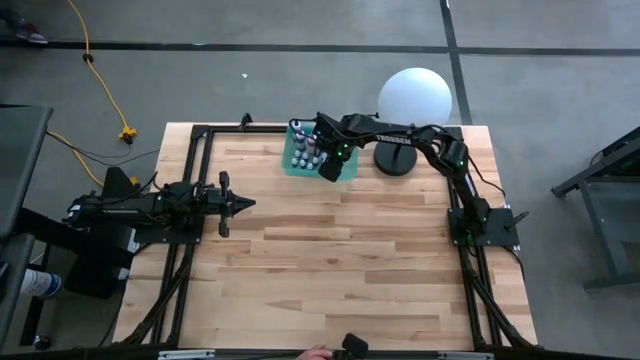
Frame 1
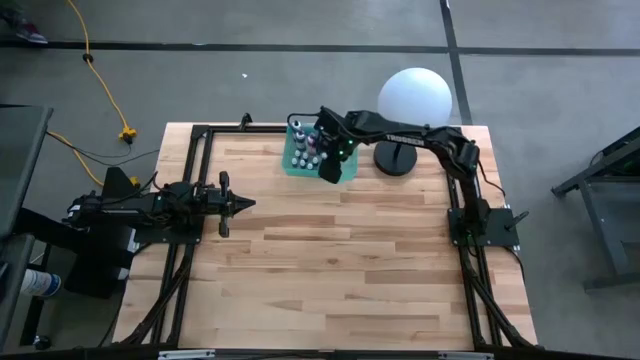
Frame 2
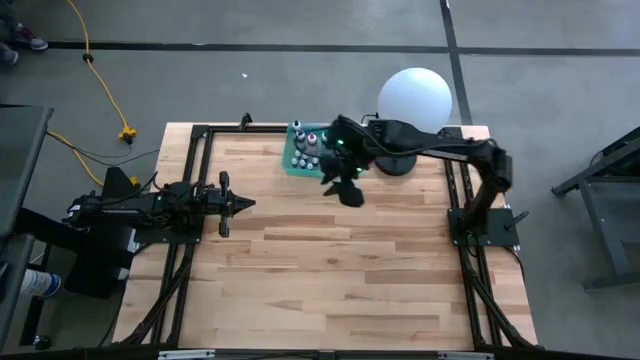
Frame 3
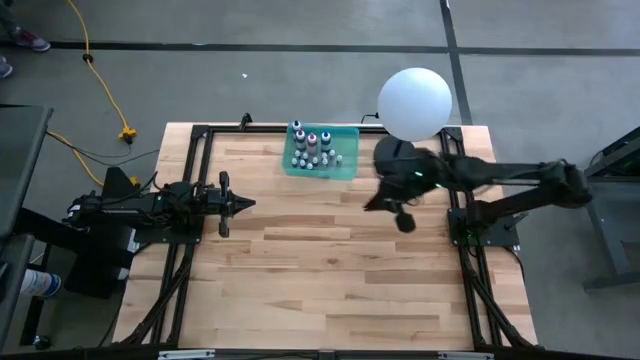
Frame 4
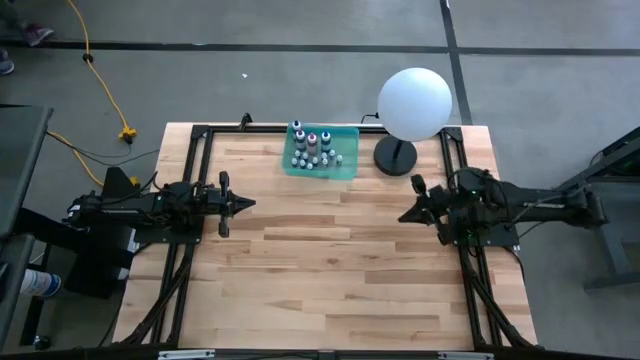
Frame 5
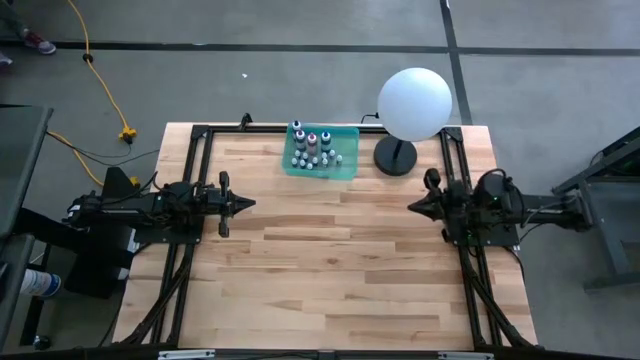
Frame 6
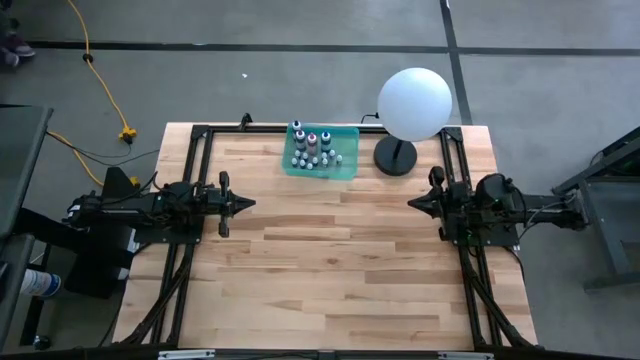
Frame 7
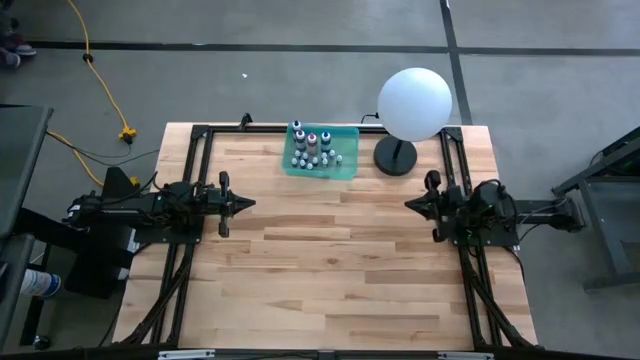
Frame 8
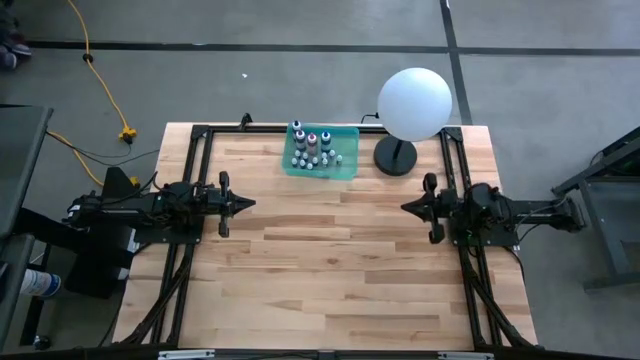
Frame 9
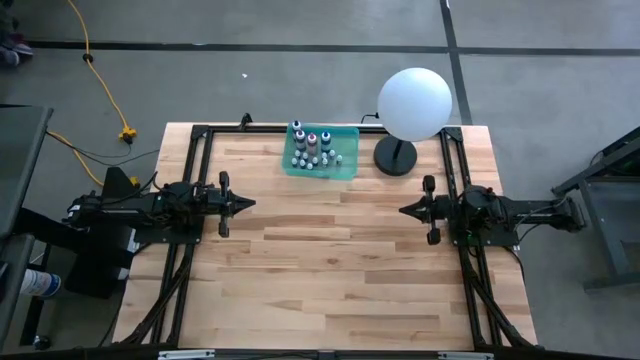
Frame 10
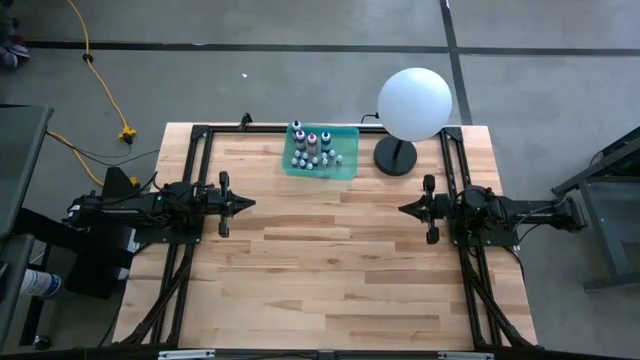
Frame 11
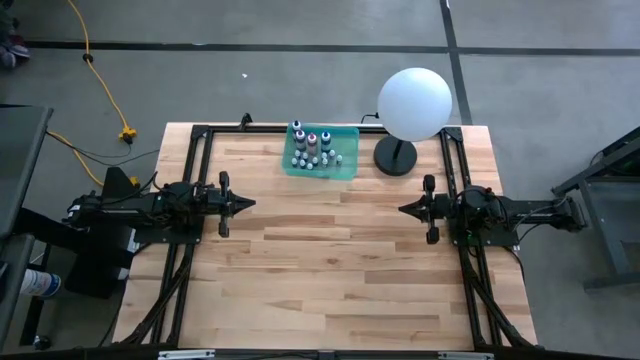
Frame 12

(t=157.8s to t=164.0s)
Task: Pick & Place food coloring
Return to Home Position

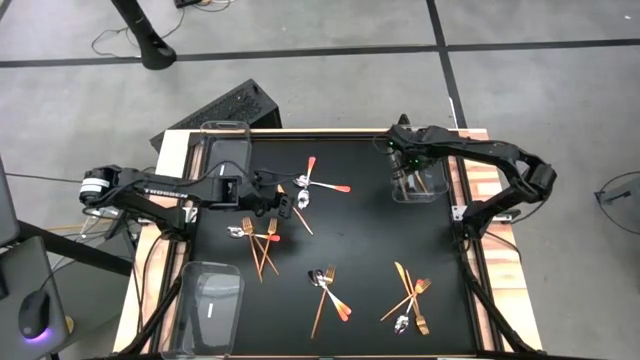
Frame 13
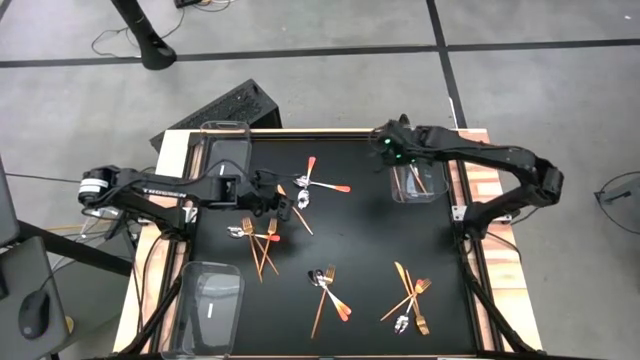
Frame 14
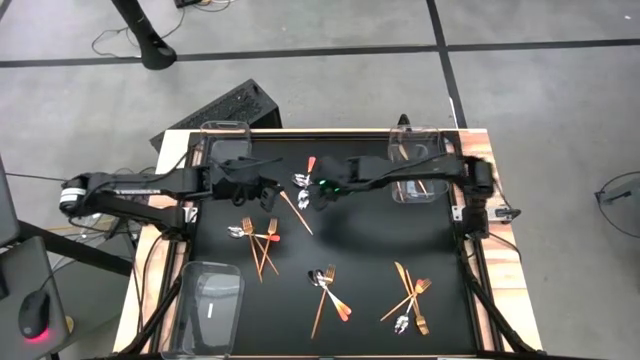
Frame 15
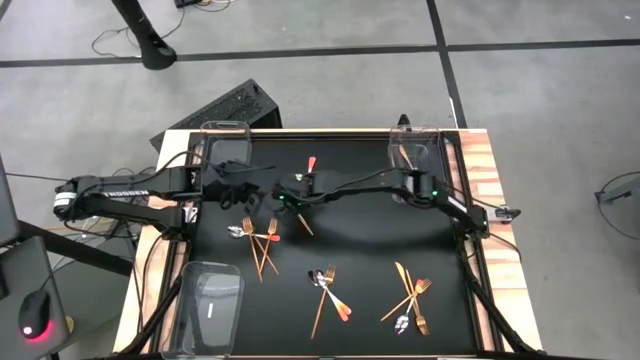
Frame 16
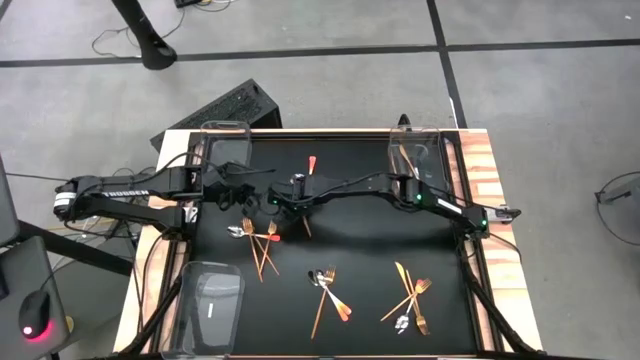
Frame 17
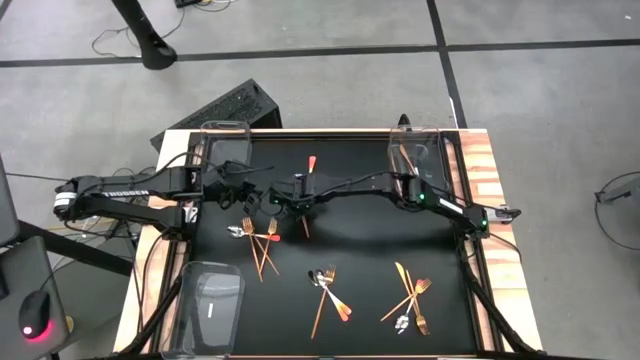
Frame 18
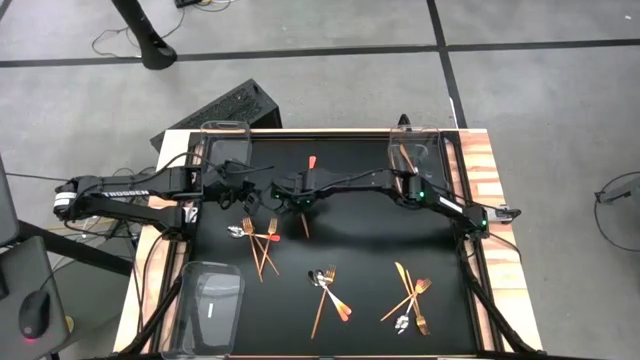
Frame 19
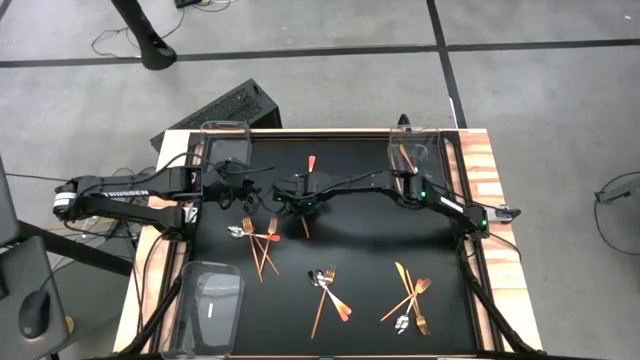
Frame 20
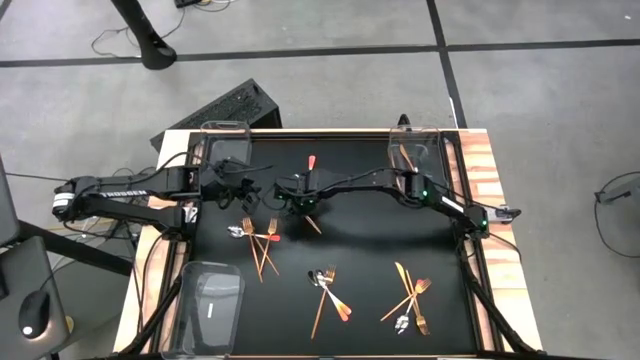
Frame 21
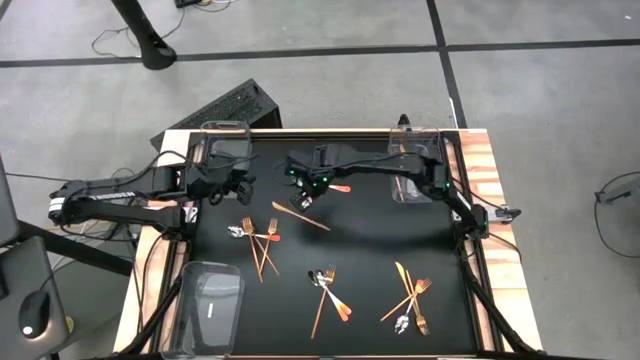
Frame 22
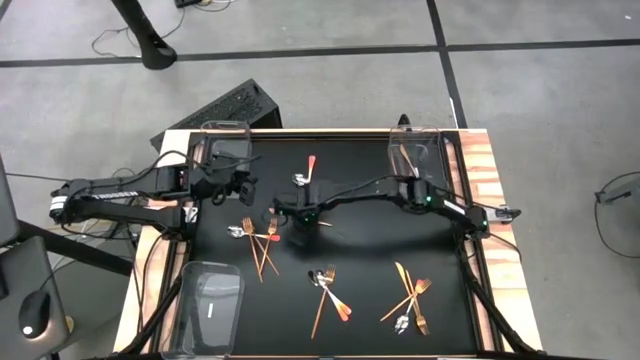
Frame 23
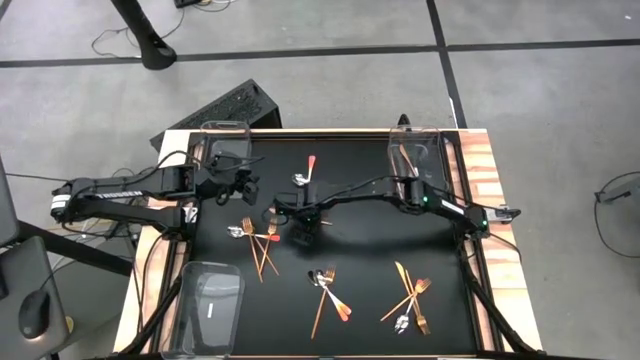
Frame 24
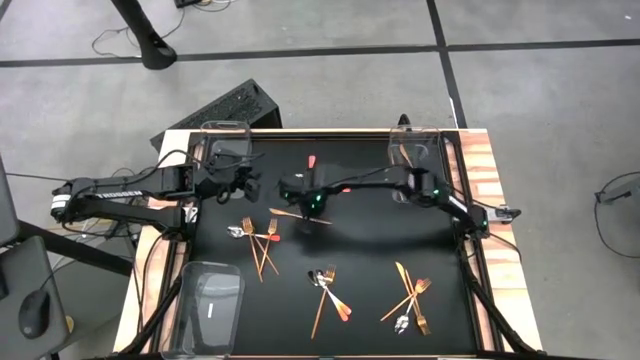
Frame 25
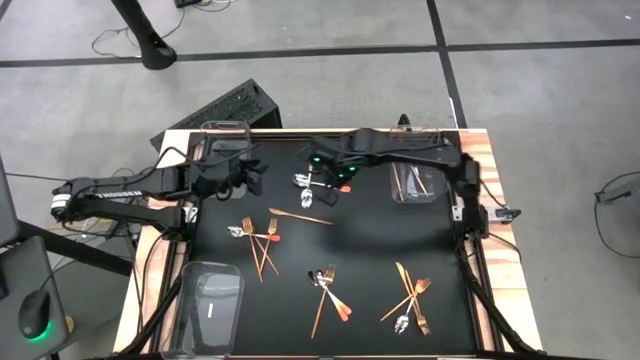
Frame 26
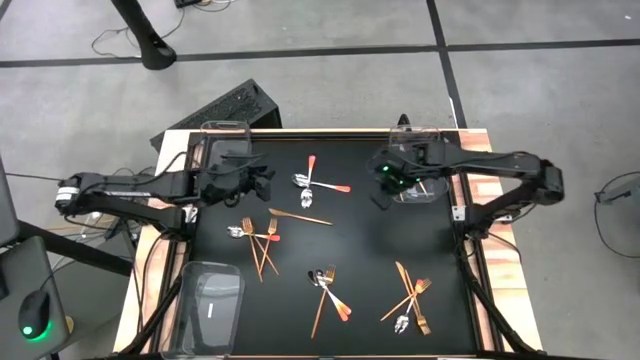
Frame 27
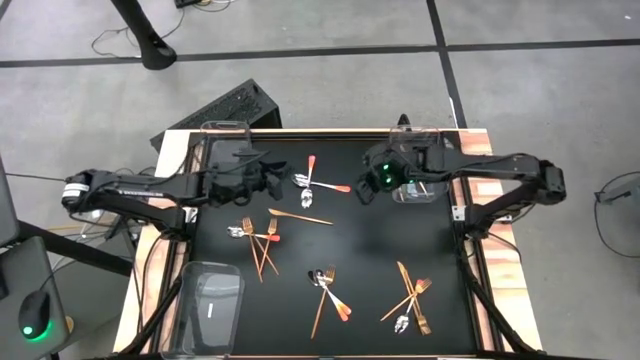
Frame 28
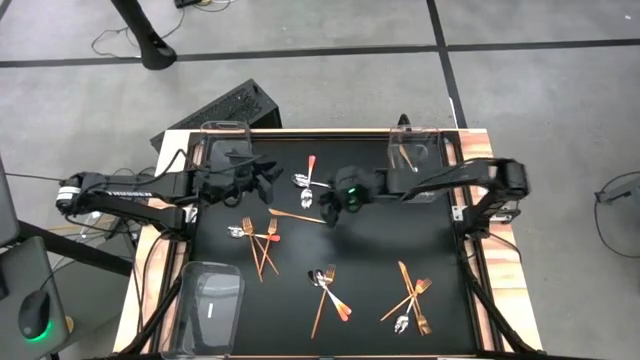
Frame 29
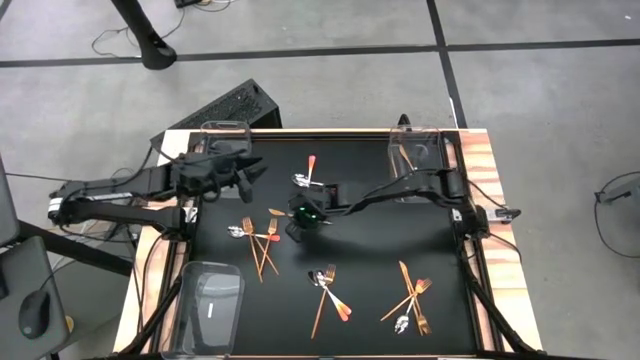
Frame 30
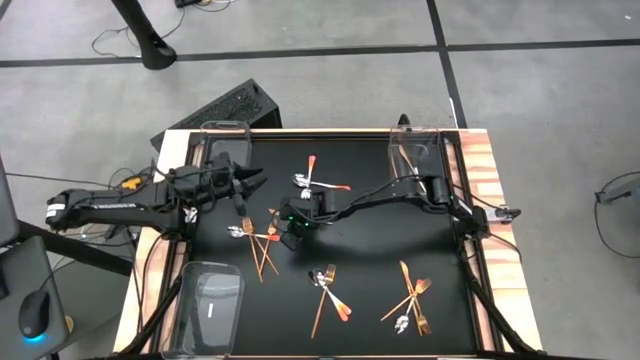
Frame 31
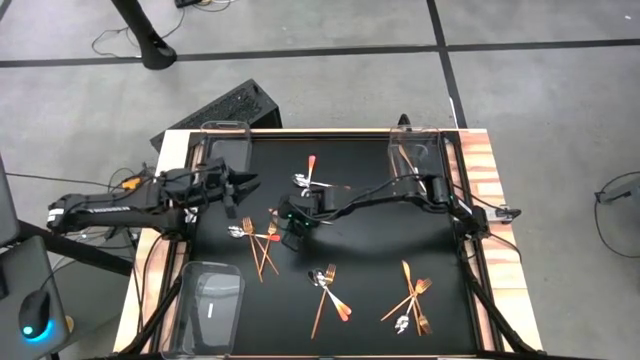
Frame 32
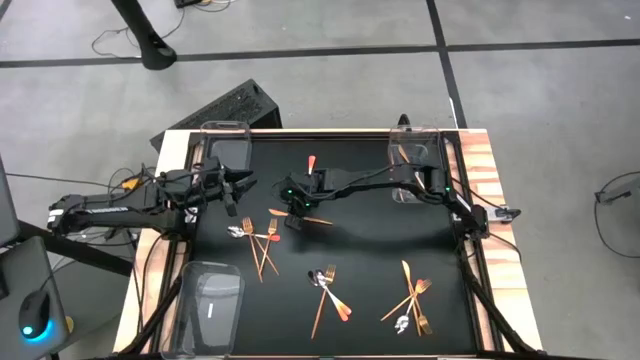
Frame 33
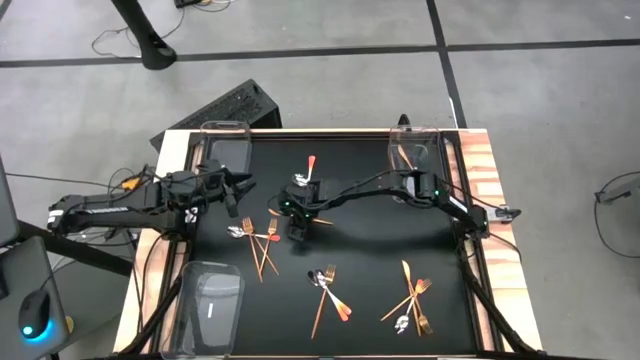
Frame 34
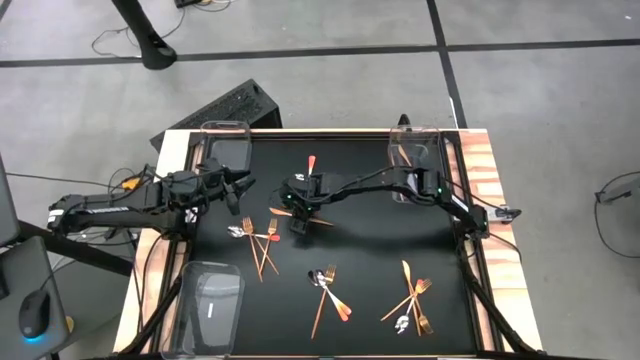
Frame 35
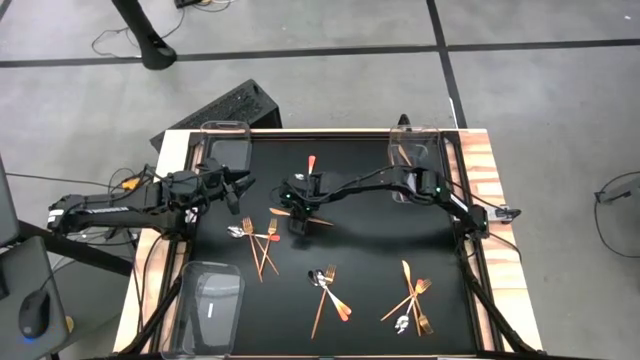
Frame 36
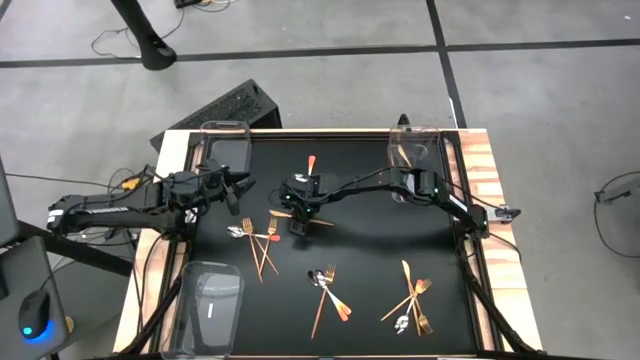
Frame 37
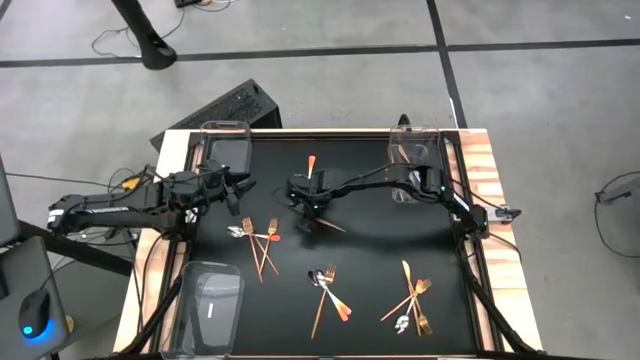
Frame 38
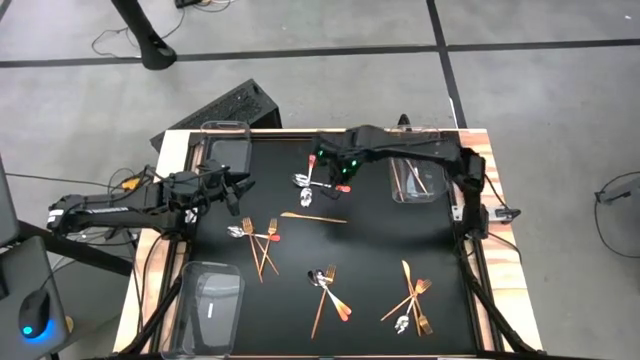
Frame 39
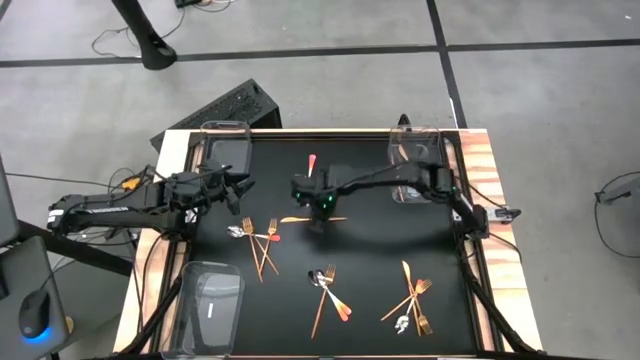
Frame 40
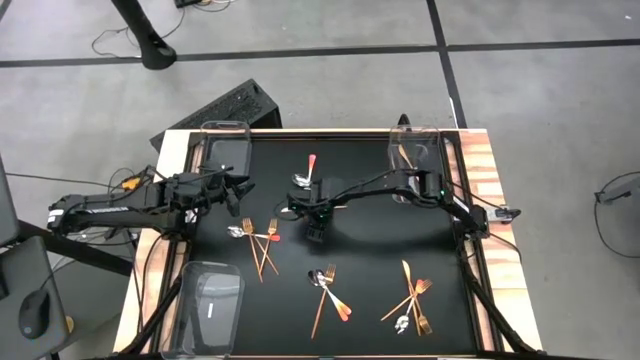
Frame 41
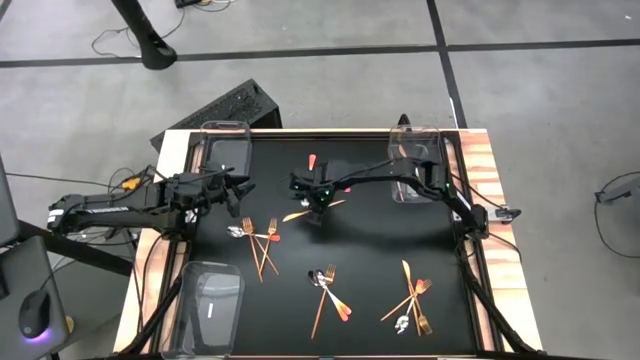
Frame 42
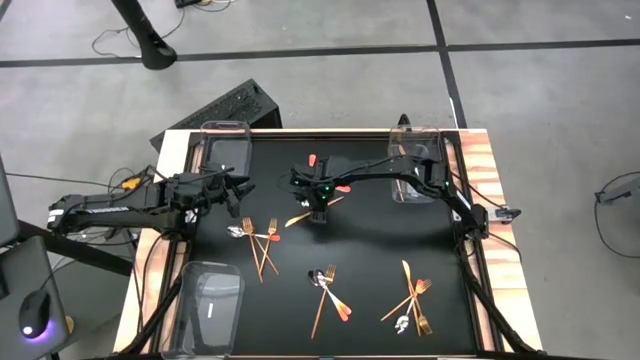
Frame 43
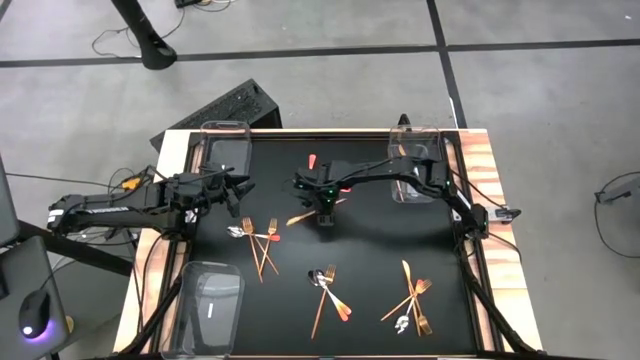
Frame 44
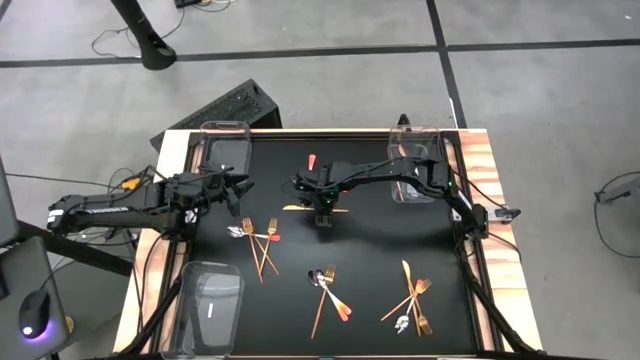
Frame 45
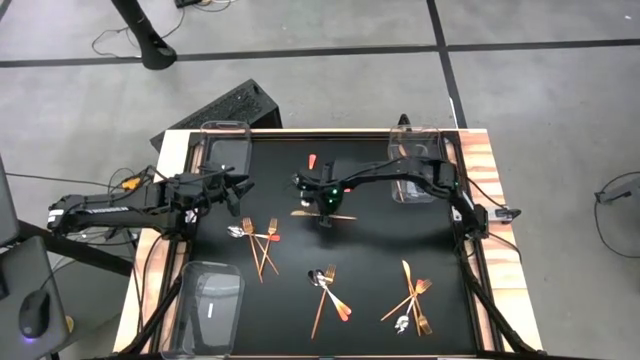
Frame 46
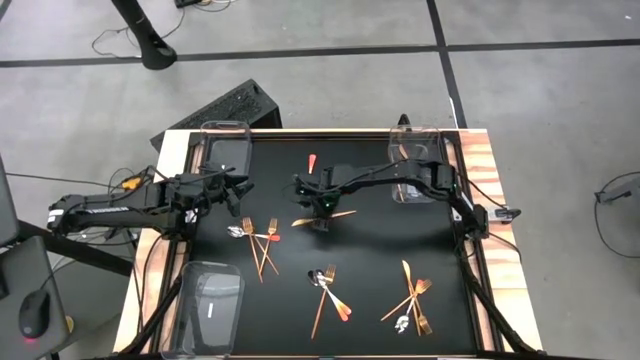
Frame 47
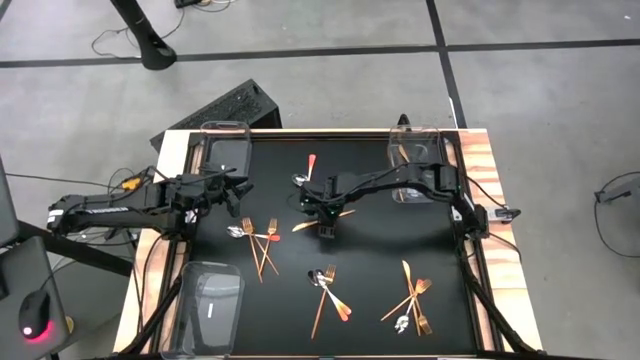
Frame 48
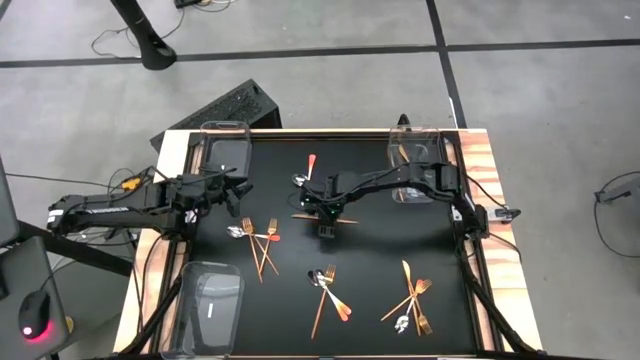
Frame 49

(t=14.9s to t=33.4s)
Task: Sort silverware by color (type)
Put the gold table knife into the top right transparent bin
